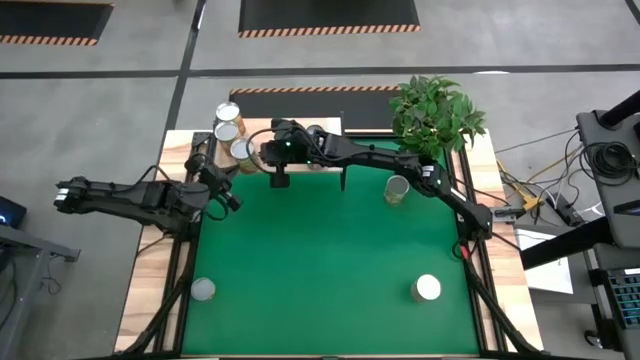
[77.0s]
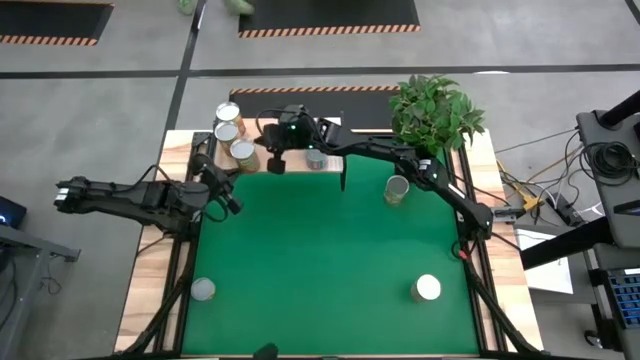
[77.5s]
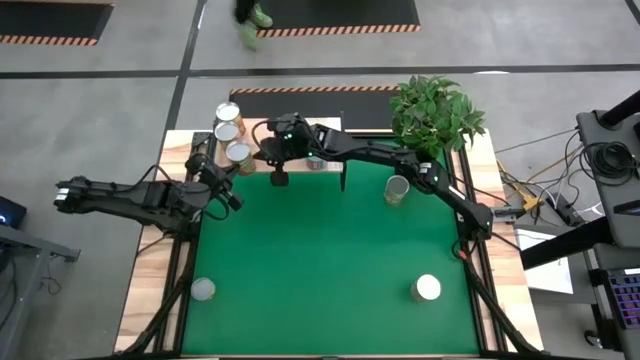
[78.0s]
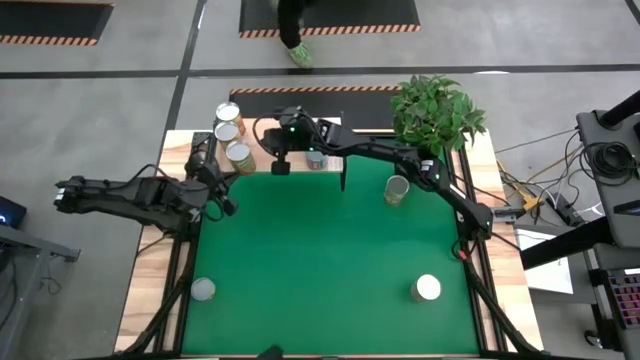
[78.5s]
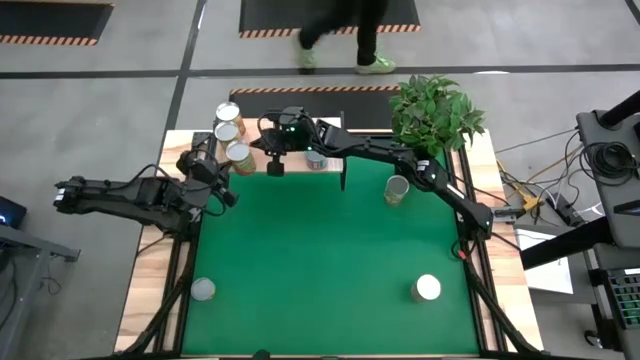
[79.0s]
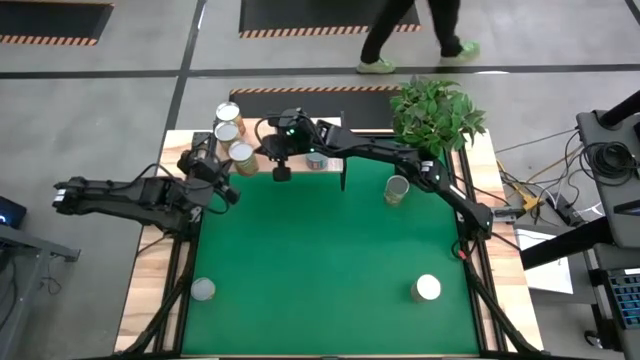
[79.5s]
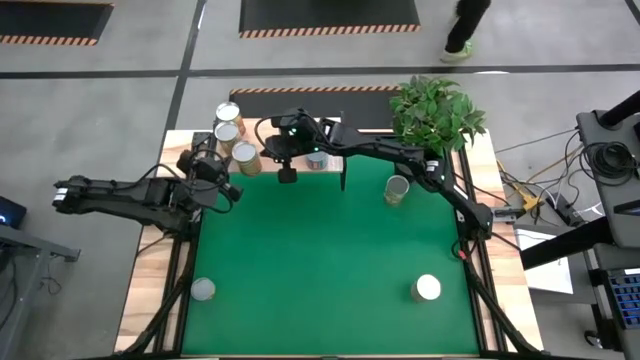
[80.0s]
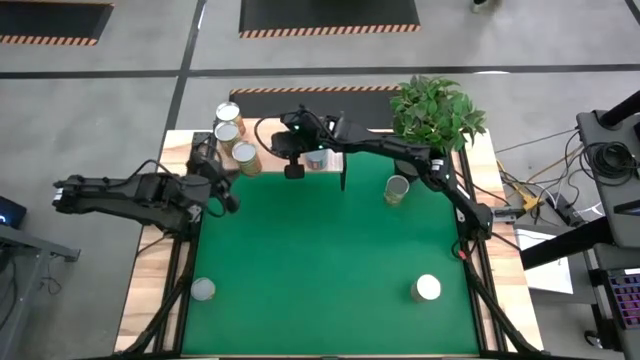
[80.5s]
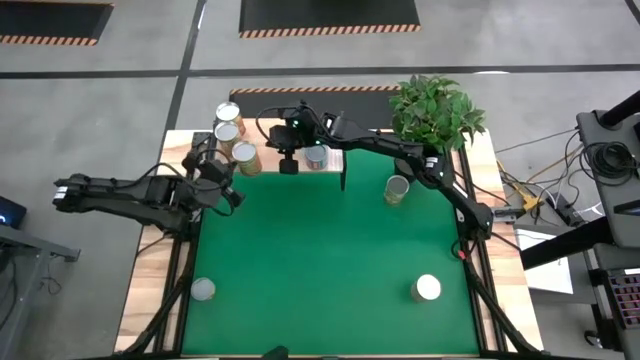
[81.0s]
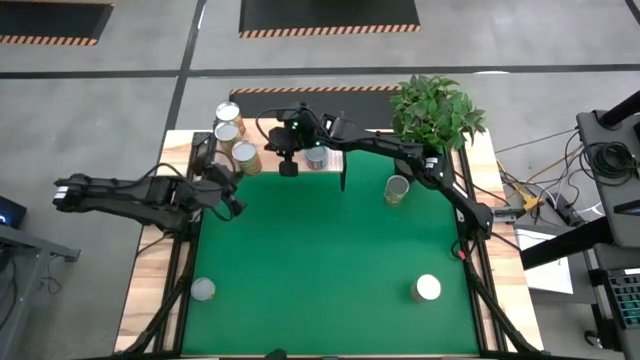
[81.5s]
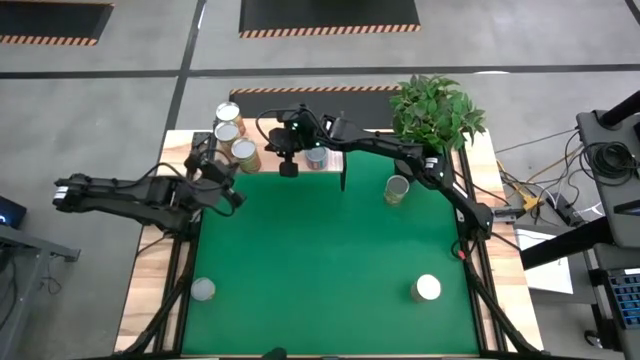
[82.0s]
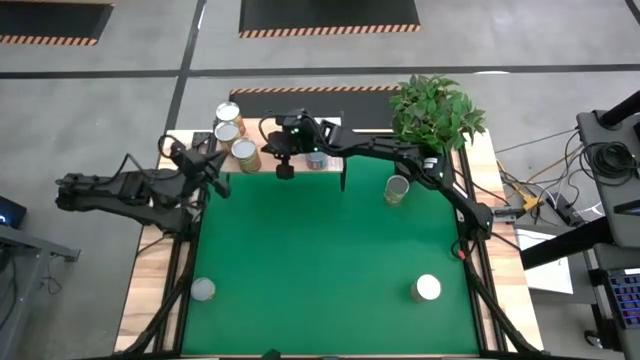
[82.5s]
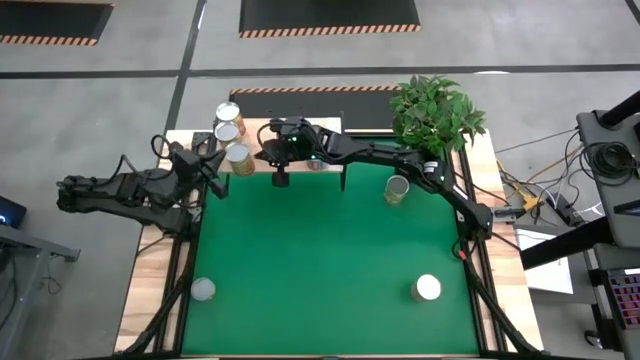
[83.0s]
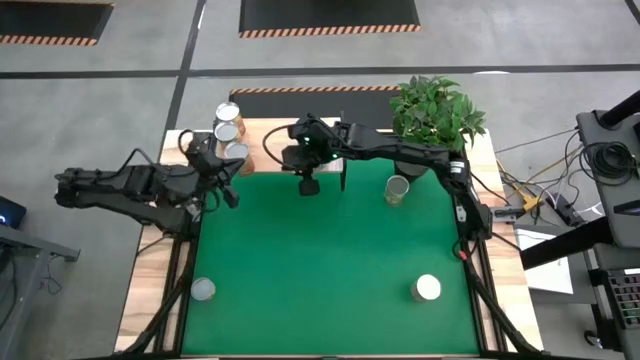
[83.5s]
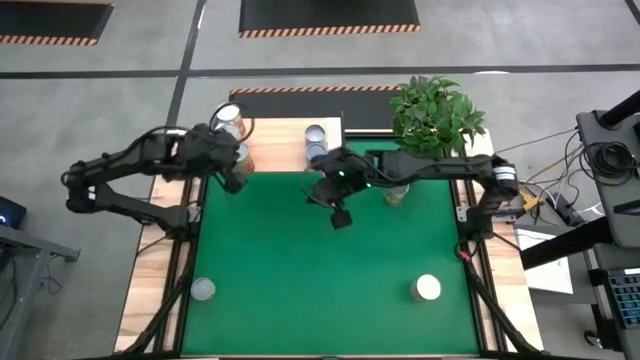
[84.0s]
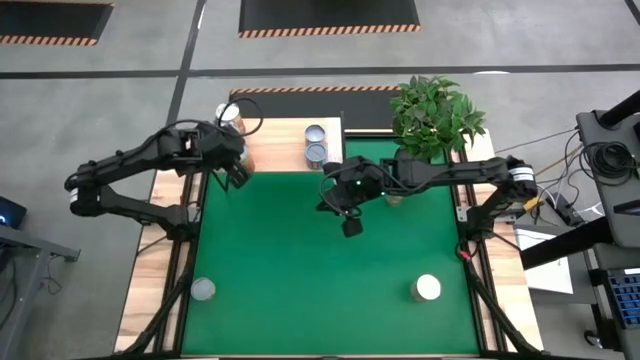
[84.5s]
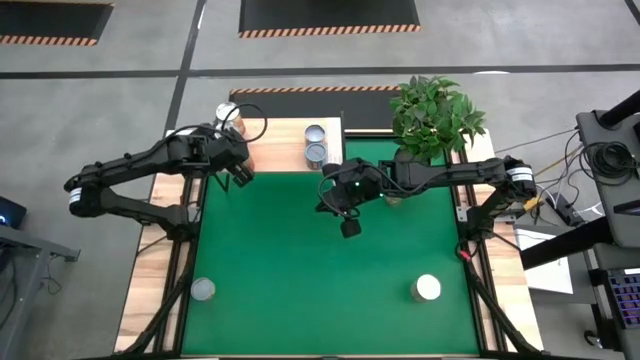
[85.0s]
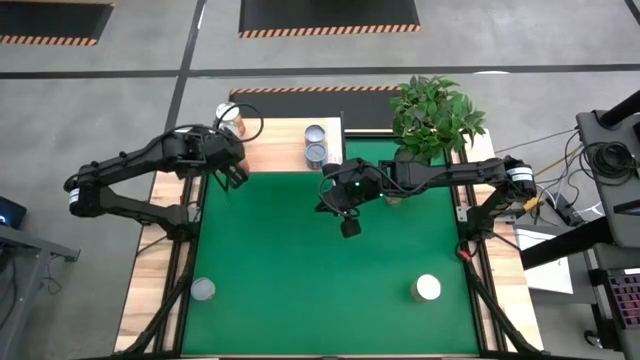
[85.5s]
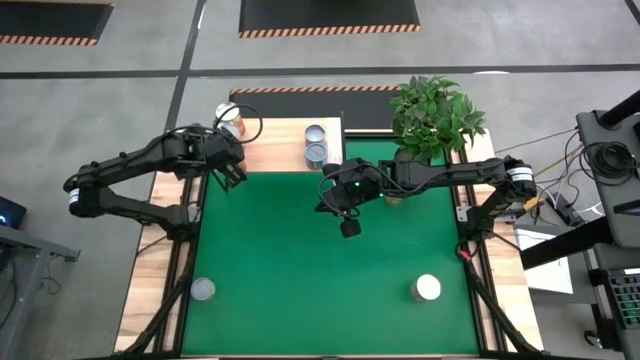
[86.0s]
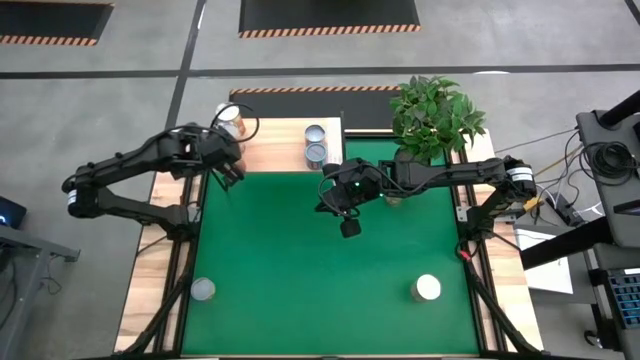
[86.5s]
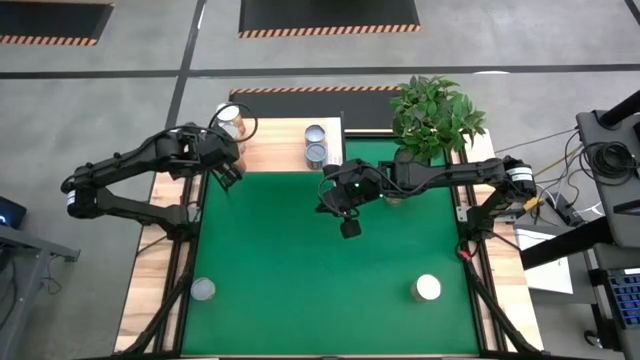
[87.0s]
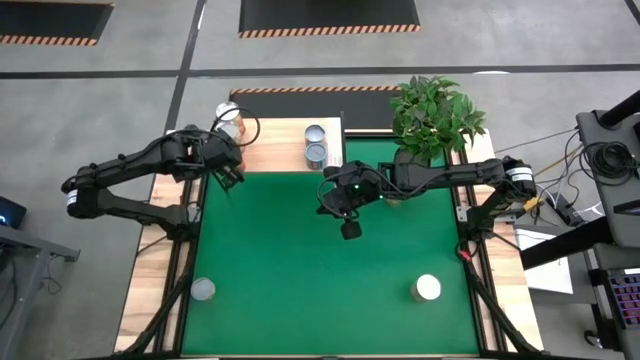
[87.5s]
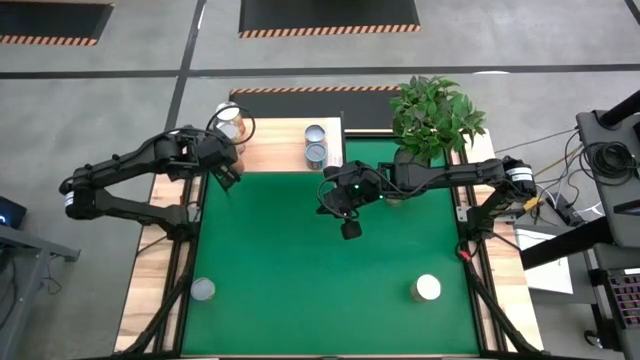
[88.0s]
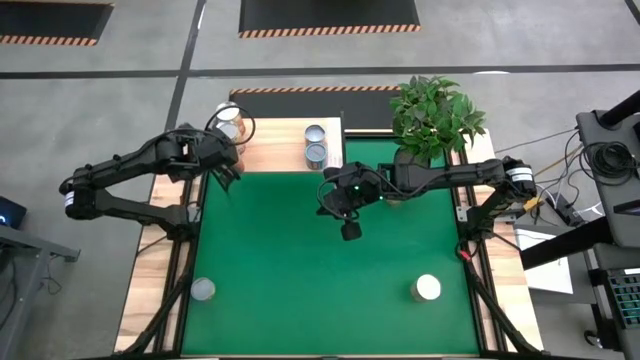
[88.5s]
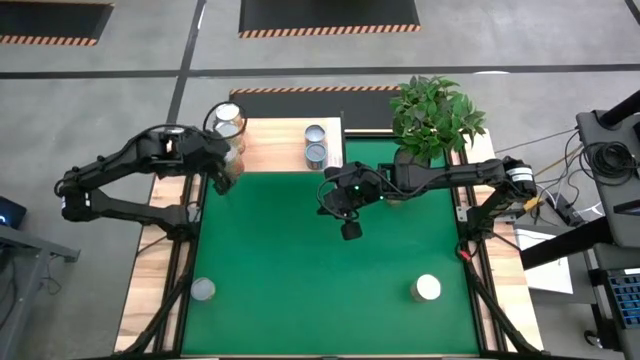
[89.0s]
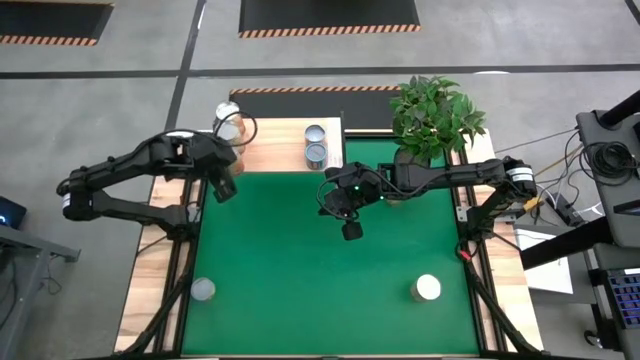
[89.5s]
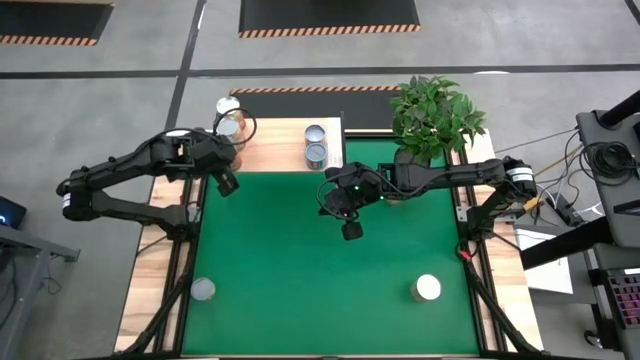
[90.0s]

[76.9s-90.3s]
Task: Pick and place cans onto a shelf
Put the orange can on the shelf aligned with the other orange can

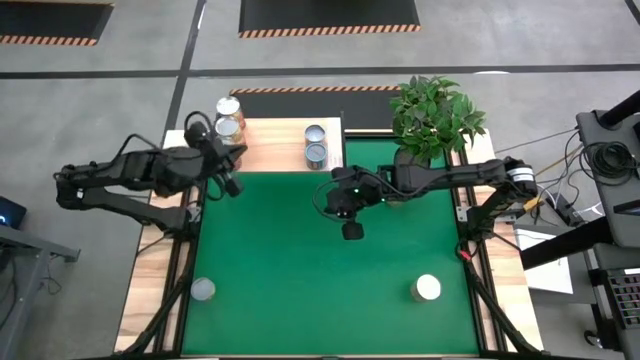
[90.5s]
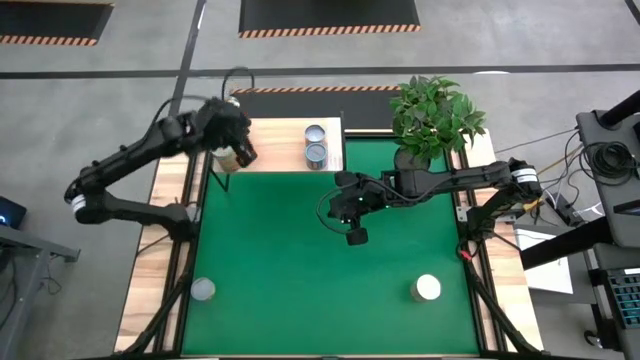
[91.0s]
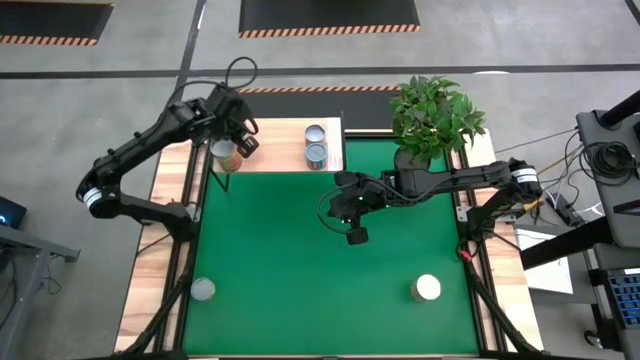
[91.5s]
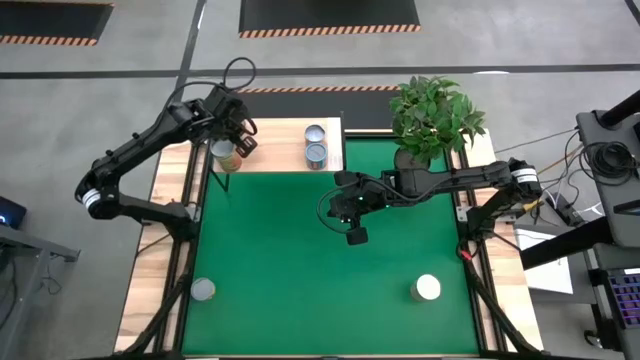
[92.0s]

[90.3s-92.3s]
Adjust the orange can

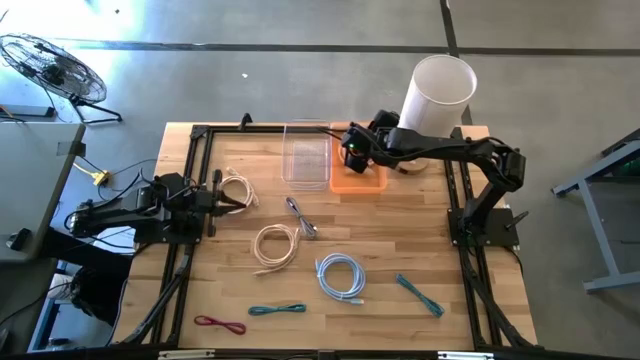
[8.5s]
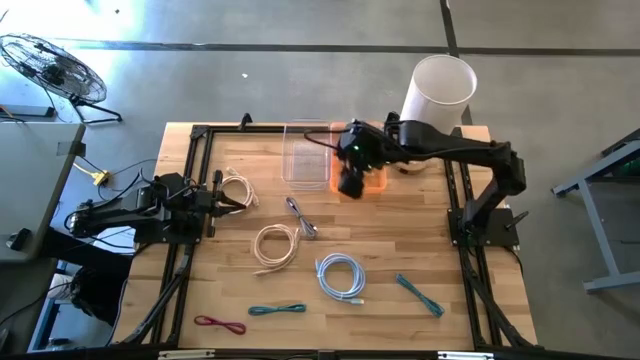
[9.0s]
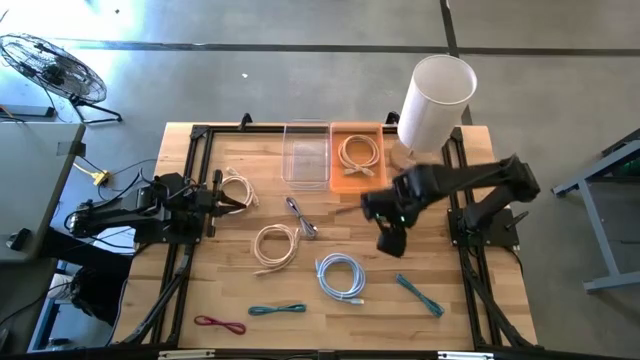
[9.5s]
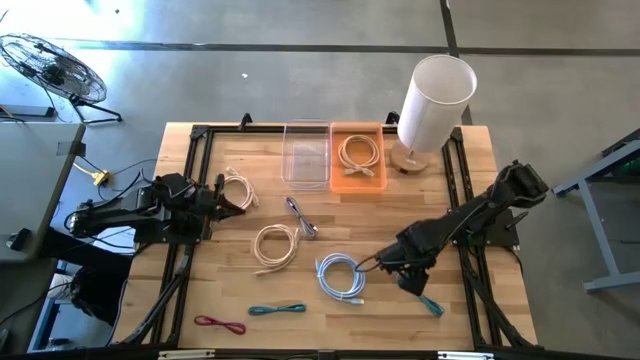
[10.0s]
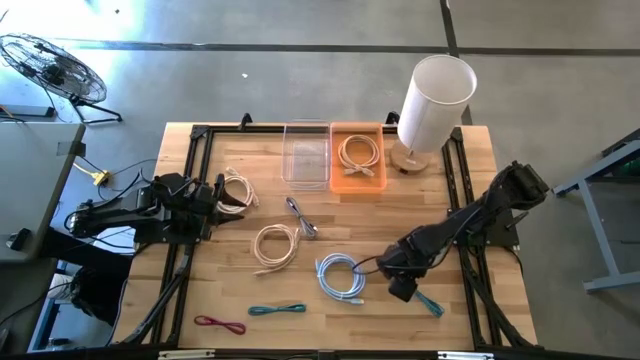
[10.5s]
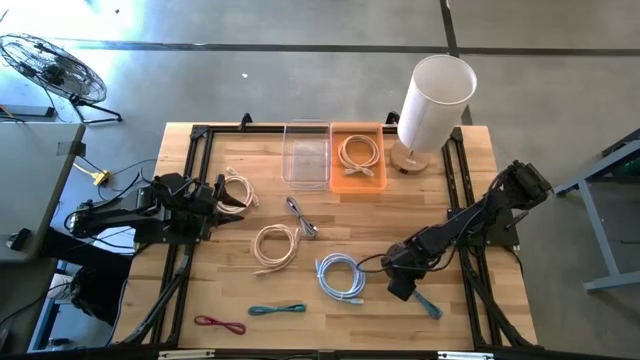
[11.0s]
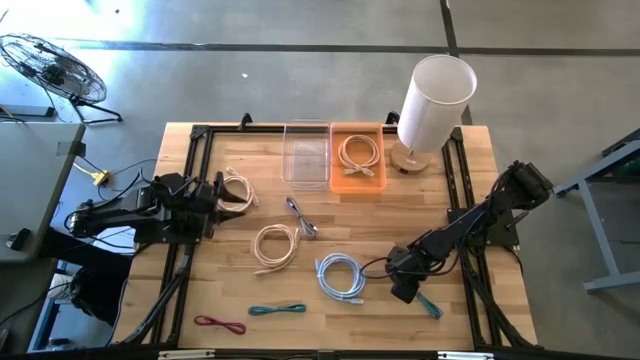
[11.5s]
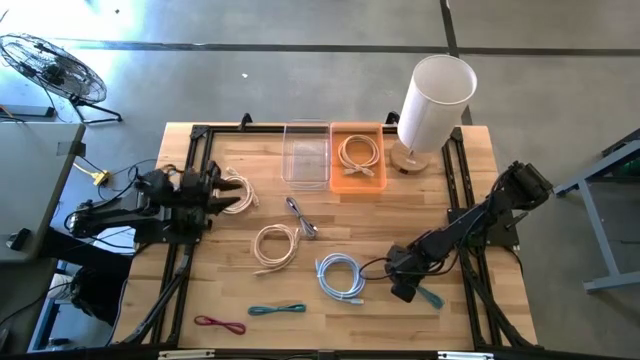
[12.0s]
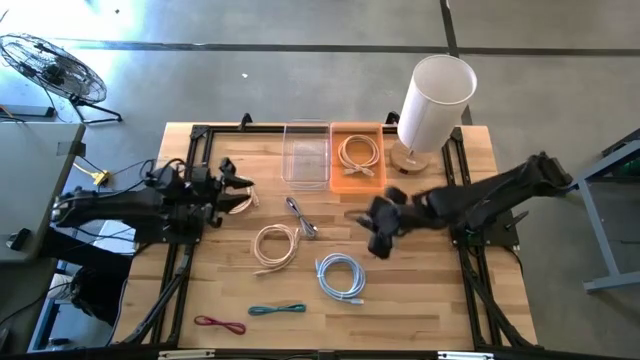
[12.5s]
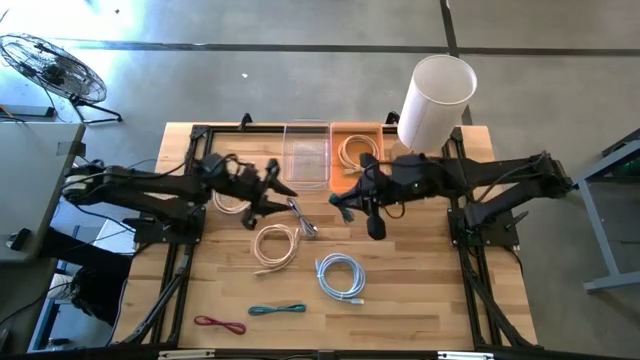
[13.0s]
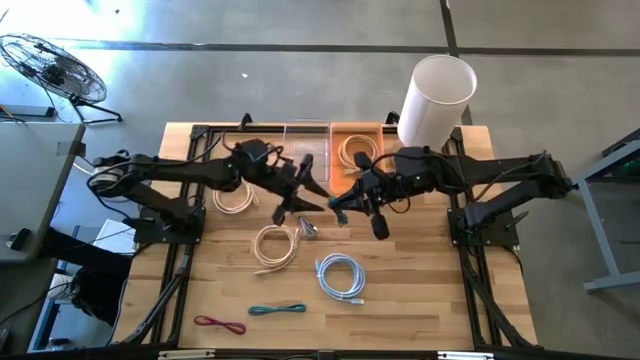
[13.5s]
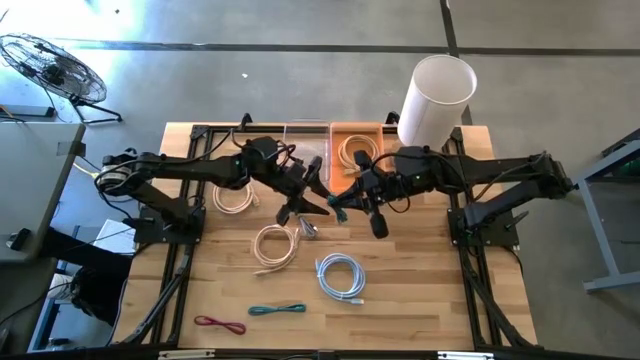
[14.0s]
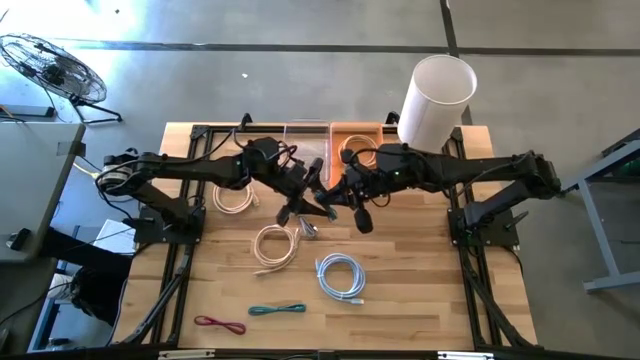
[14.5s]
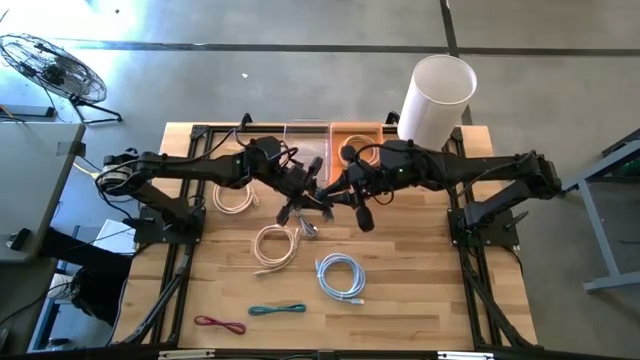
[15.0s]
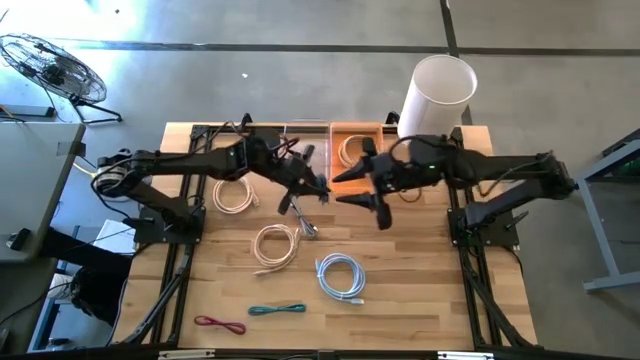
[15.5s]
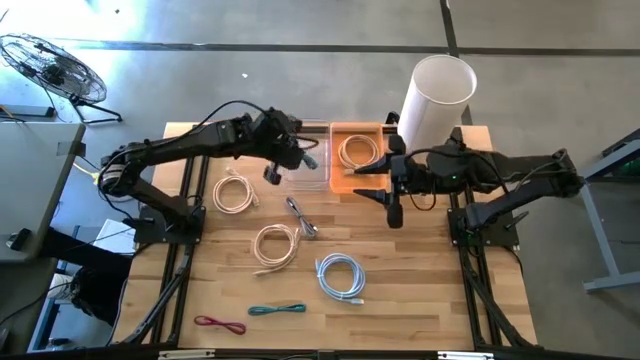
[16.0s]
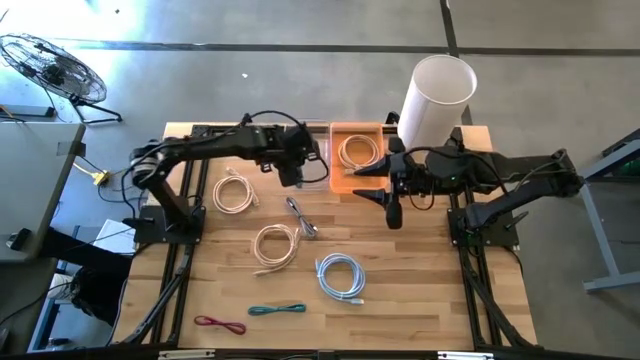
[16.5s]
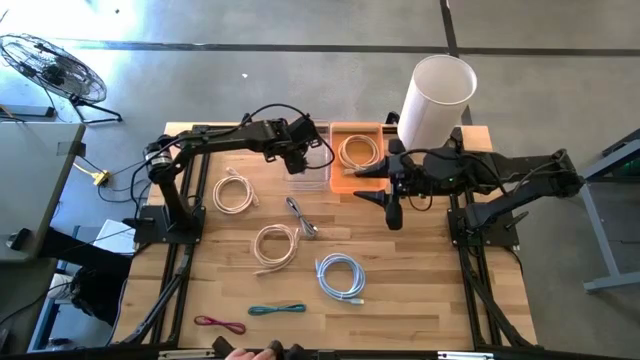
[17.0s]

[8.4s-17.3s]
Task: Pick & Place USB Port
Put the right blue charger cable into the transparent bin
